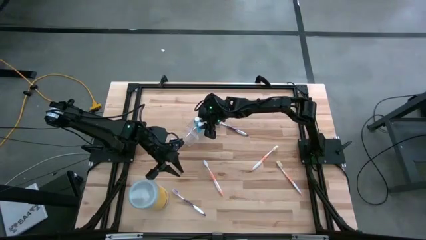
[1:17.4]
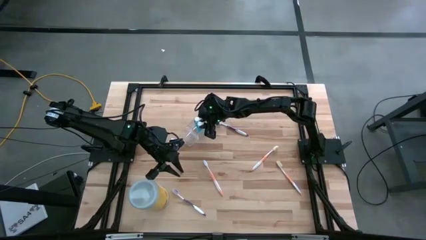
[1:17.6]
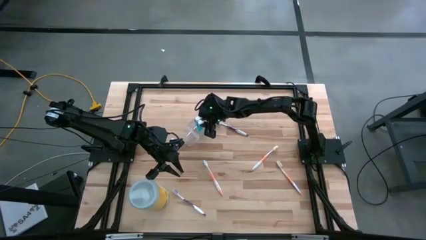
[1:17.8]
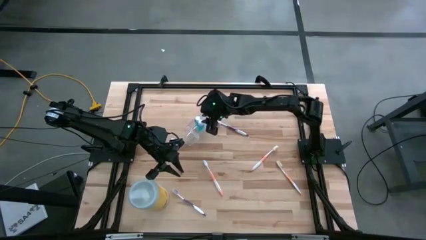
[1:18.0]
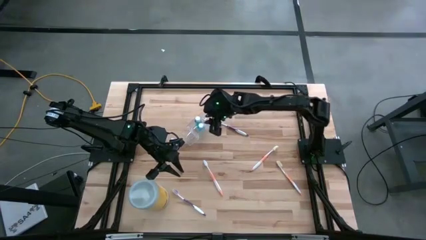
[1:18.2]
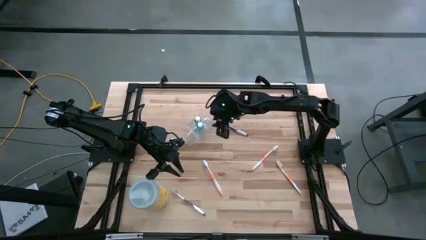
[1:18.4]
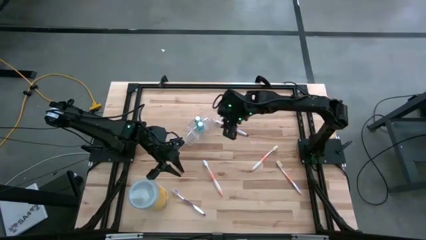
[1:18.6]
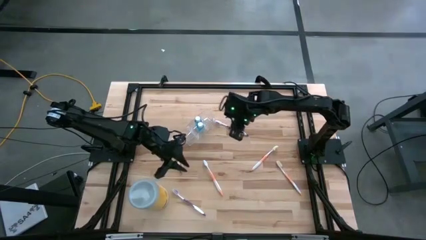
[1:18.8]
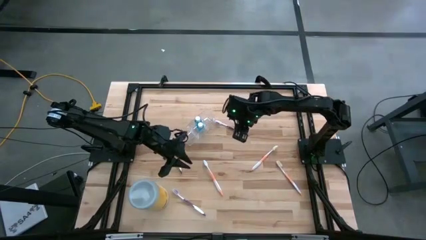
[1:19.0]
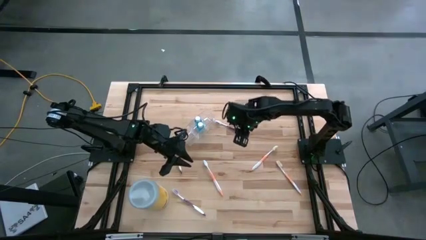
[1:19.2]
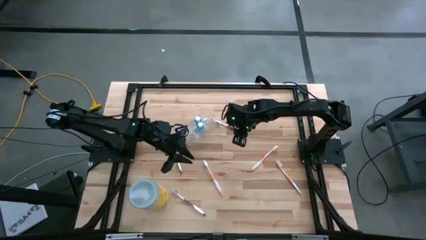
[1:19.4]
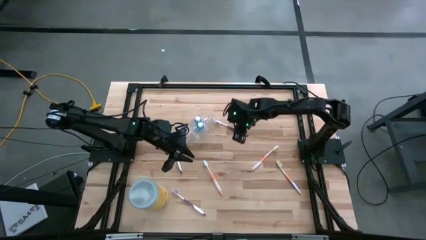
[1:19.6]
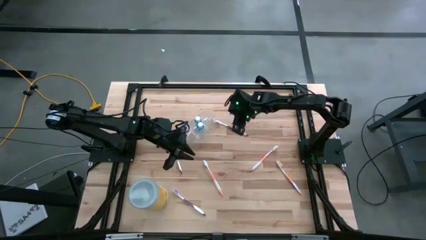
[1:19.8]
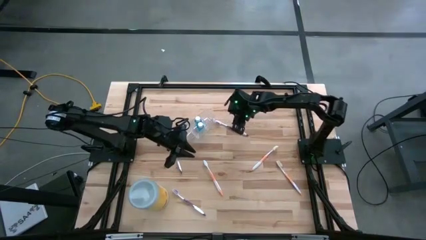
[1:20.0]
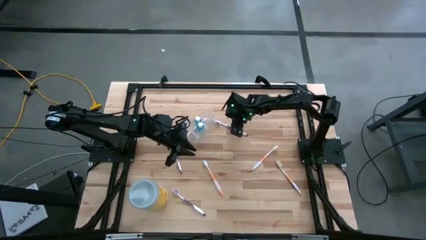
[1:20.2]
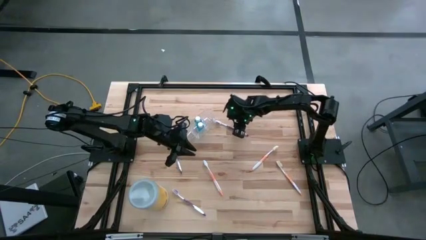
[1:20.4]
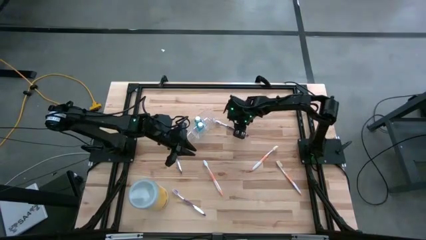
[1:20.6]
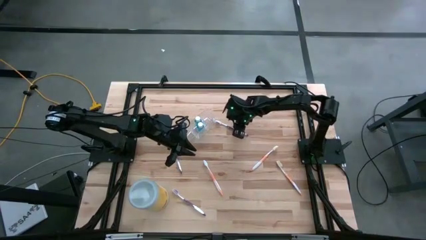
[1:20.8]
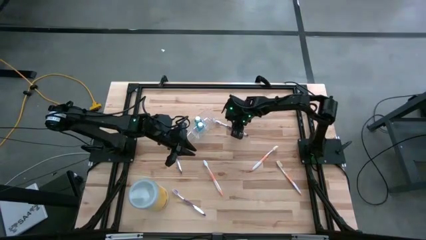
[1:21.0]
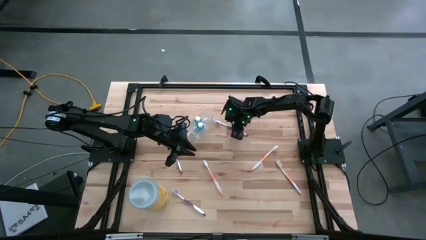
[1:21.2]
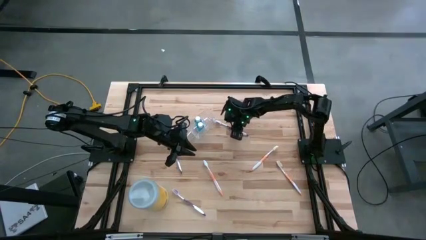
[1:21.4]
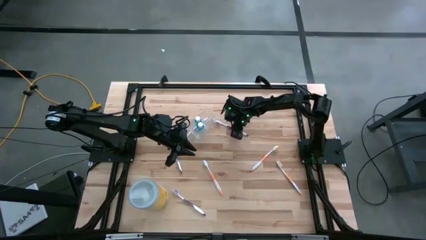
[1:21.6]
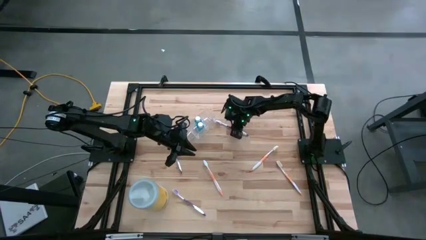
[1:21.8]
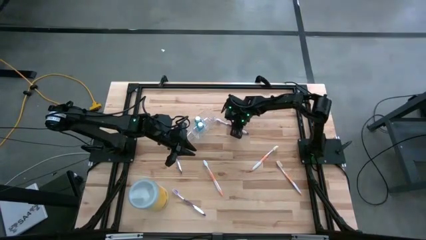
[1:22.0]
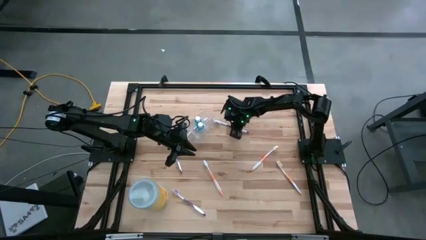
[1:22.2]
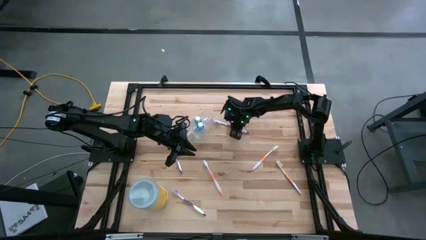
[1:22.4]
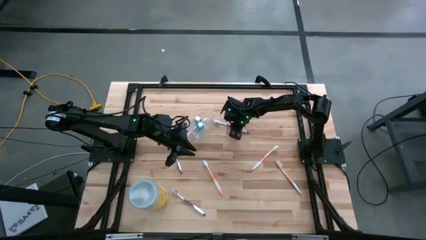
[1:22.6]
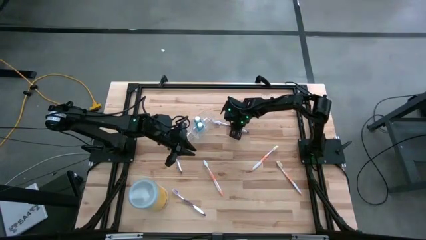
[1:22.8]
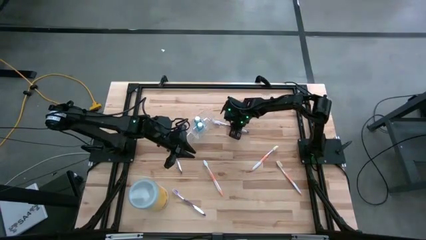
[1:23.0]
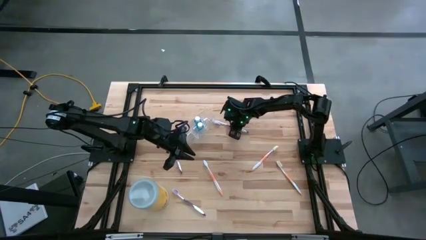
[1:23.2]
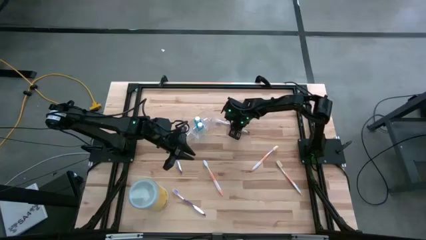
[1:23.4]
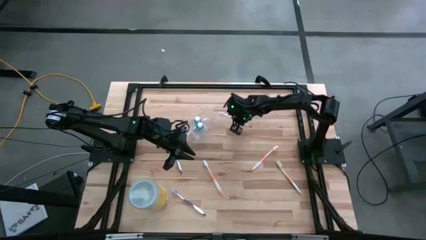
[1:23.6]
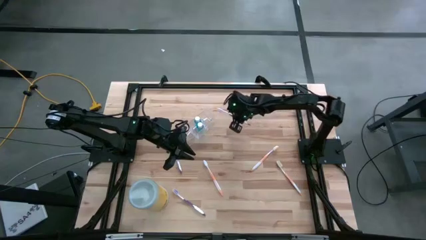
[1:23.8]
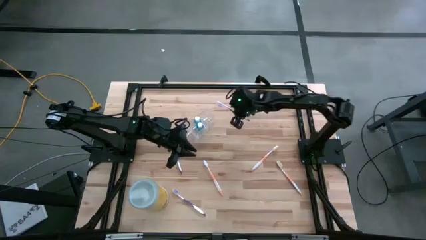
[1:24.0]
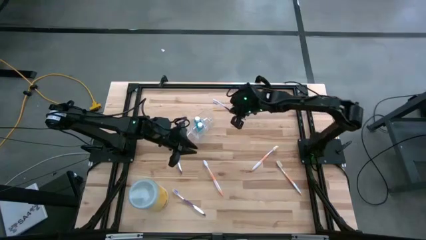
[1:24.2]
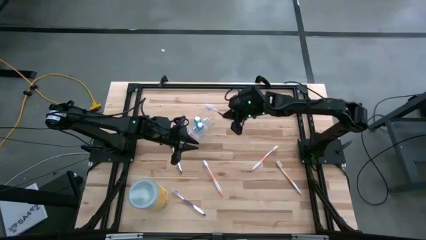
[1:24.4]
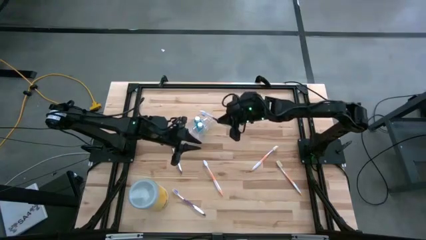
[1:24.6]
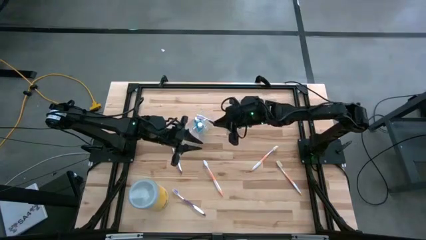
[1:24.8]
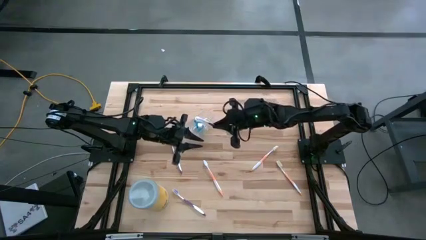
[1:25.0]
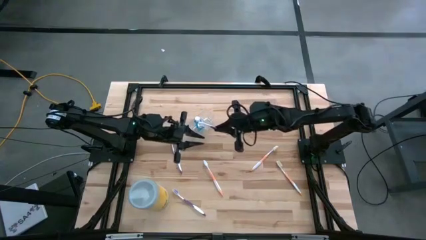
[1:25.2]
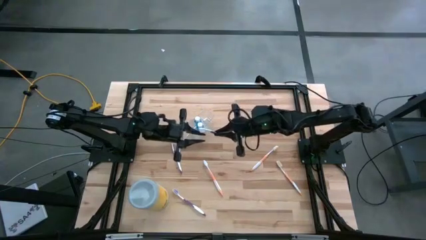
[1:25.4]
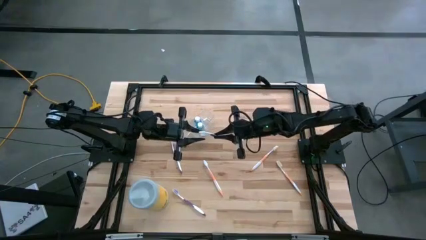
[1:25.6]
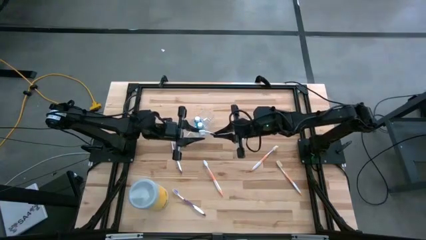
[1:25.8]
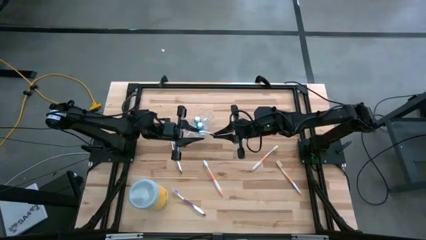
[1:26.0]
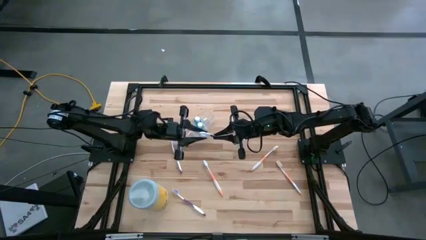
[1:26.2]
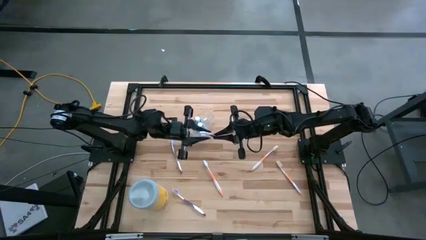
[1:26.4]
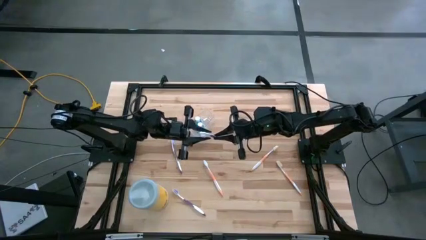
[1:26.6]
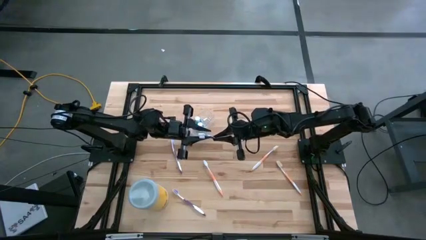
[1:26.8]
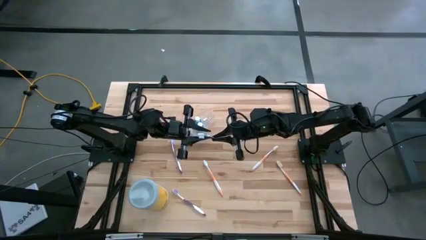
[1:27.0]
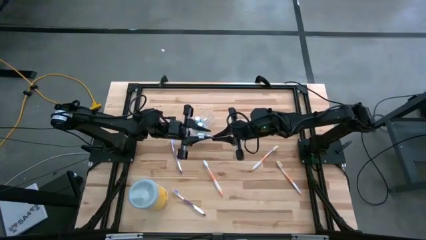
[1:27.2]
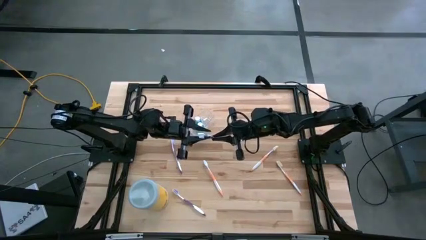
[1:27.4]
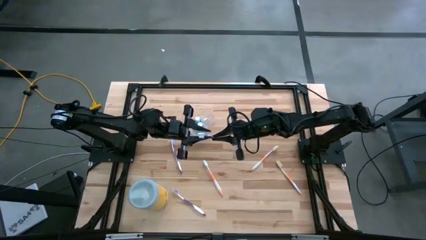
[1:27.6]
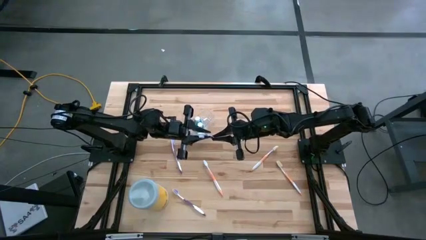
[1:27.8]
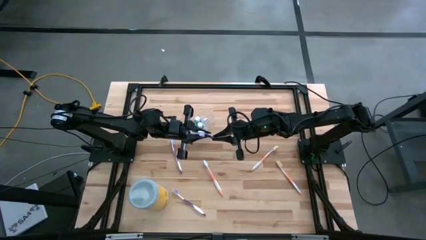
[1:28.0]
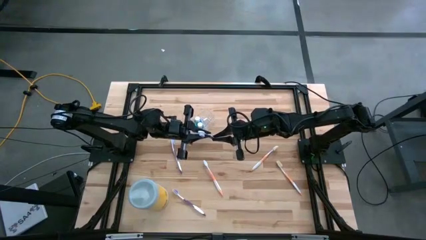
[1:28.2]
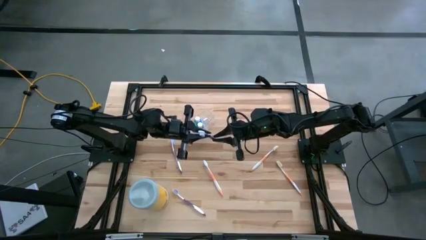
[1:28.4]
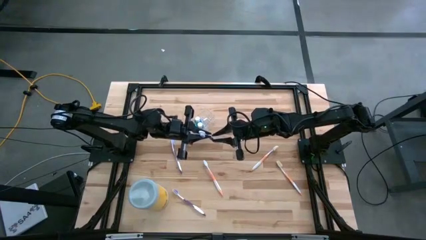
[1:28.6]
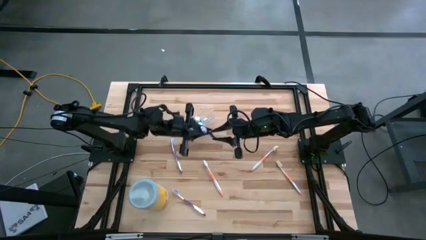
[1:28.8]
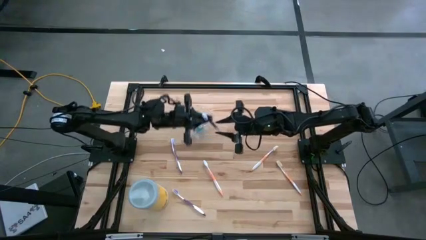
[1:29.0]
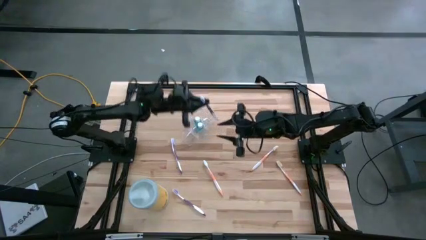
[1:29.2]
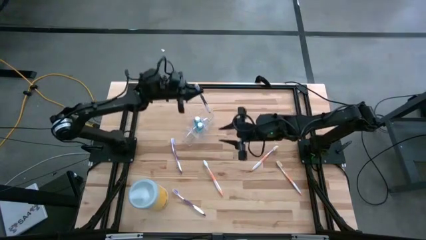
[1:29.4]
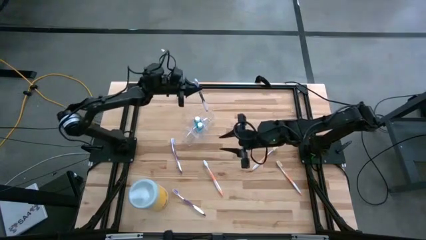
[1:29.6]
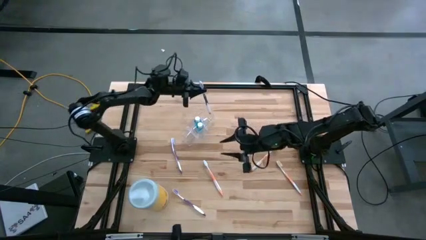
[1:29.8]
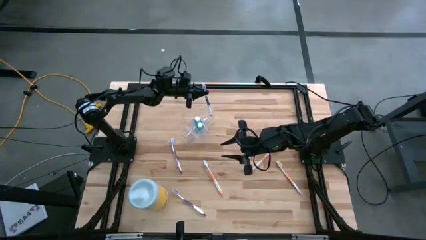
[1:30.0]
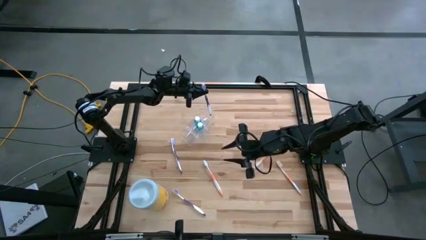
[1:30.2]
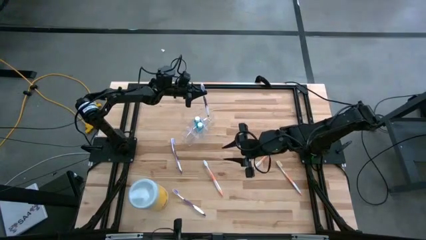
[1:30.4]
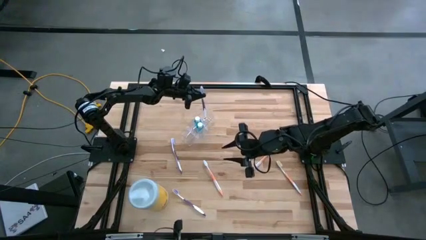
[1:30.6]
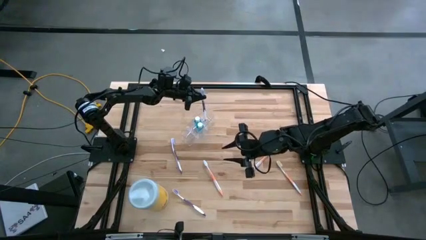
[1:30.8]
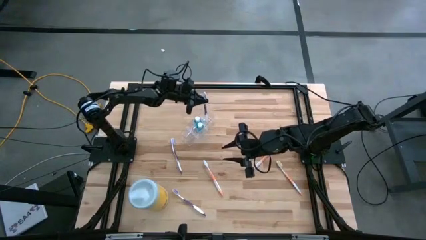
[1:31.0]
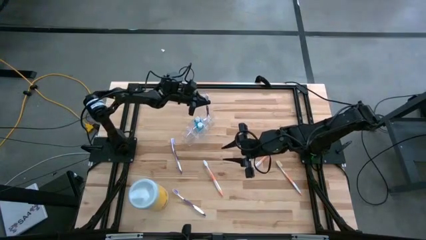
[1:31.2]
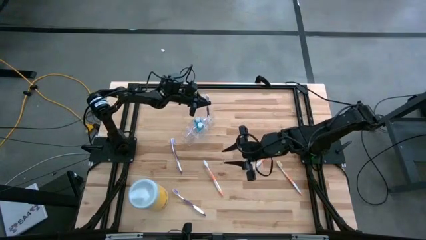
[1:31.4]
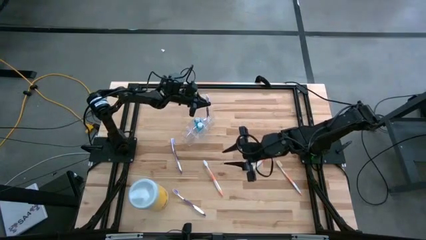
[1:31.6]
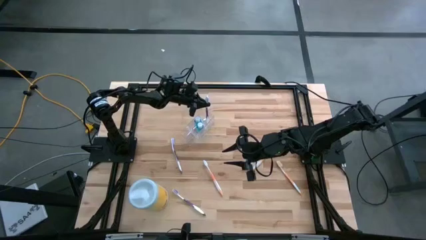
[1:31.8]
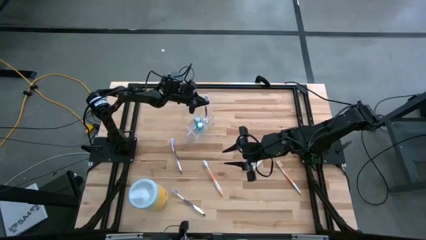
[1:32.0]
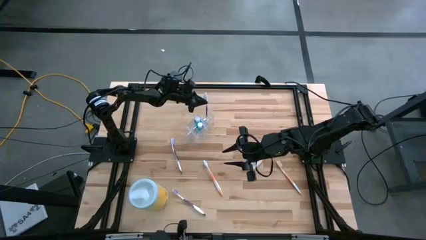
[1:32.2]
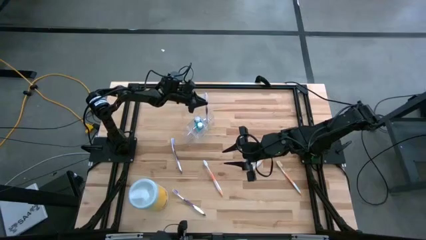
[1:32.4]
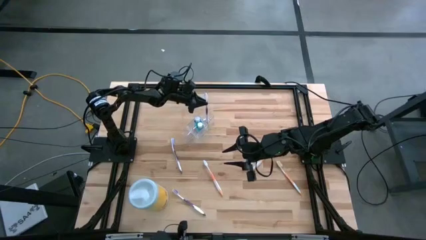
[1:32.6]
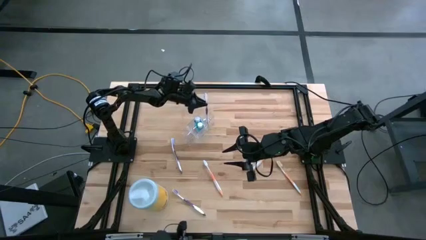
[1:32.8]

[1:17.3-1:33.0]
Task: Pick & Place toothbrushing station
Put the top violet toothbrush into the transparent organizer
